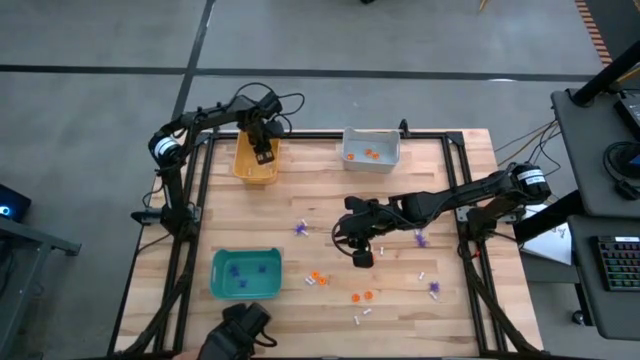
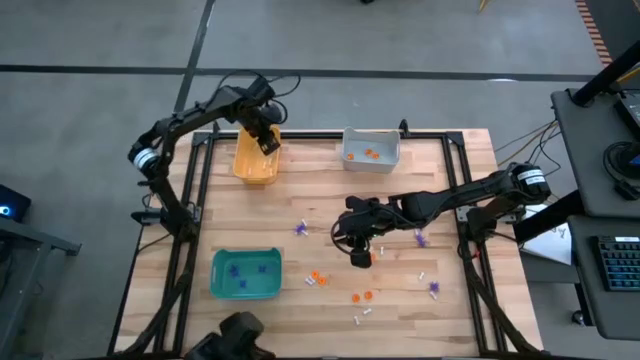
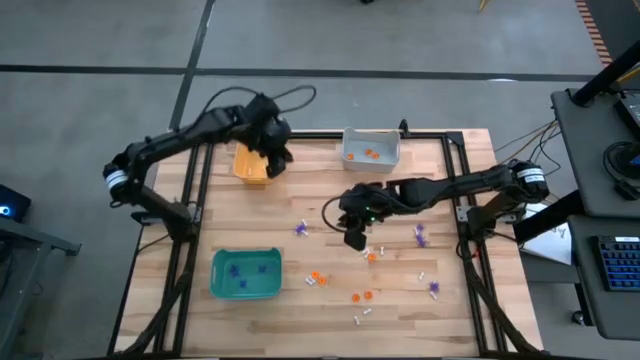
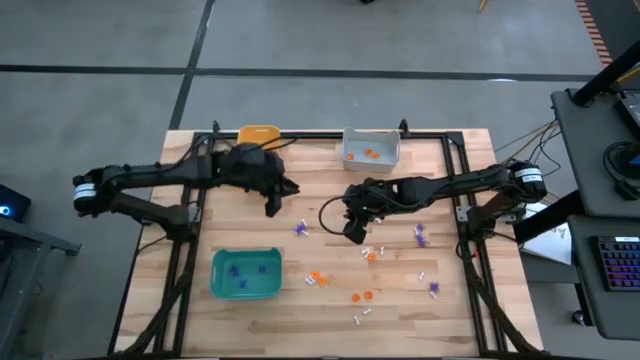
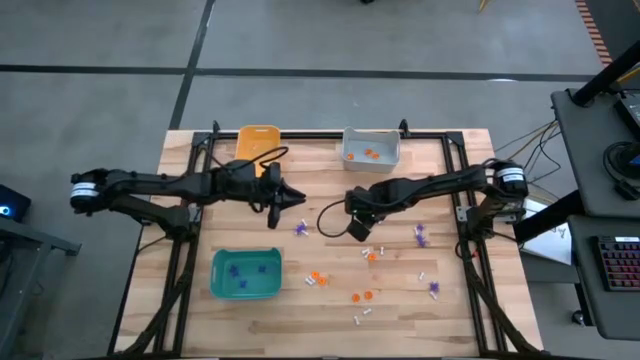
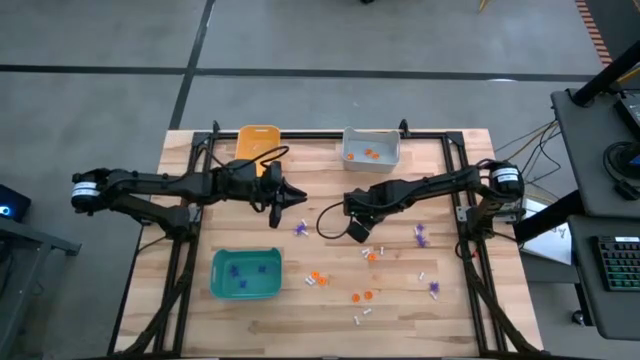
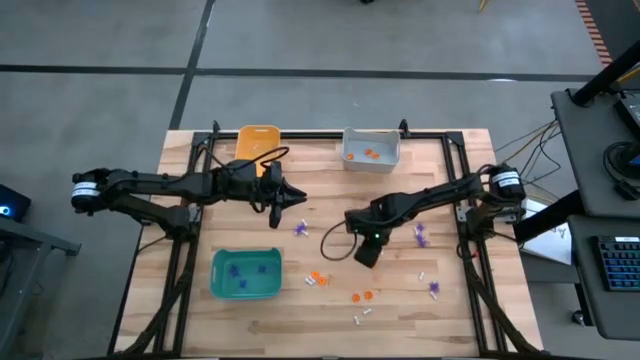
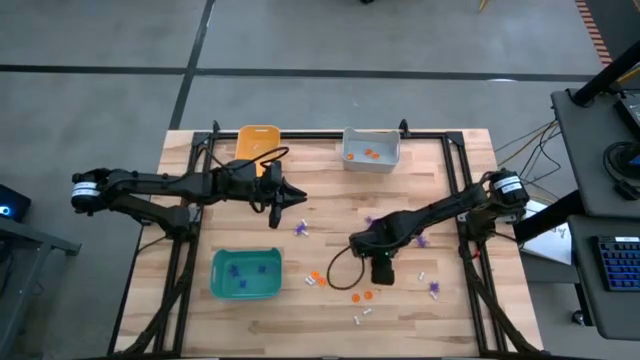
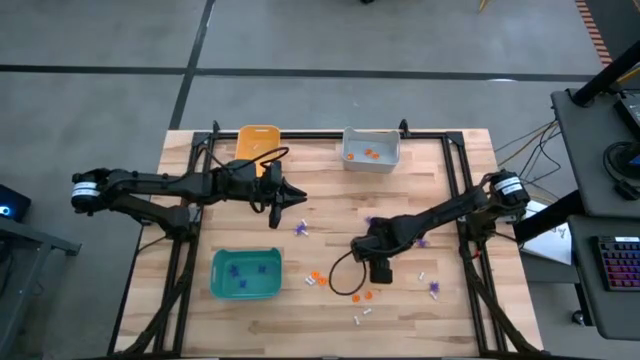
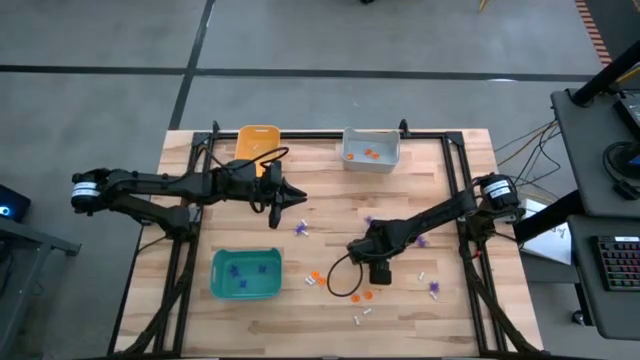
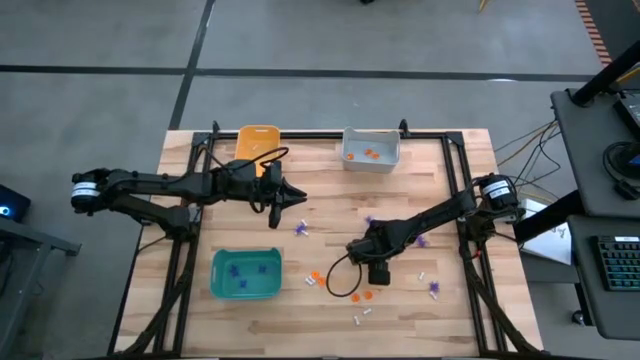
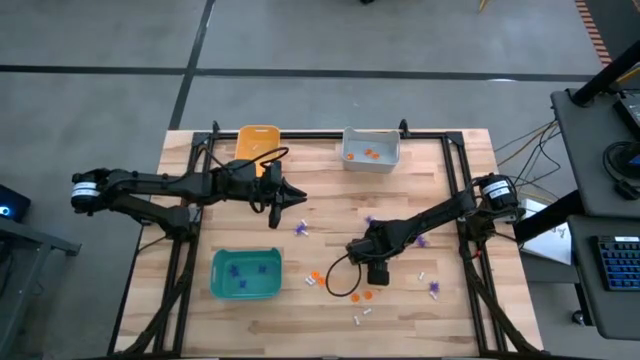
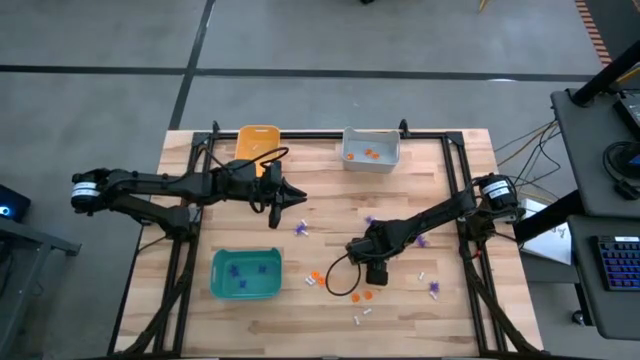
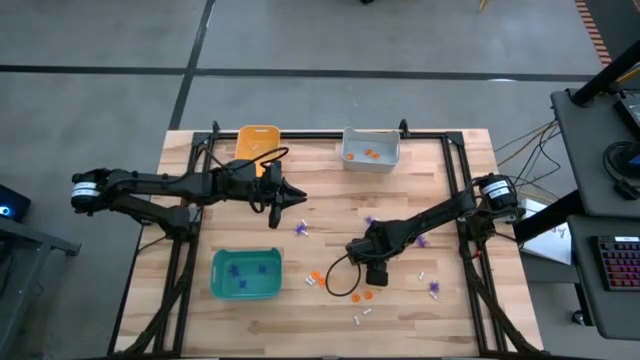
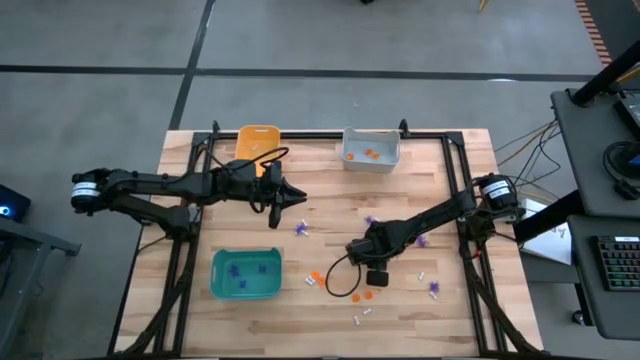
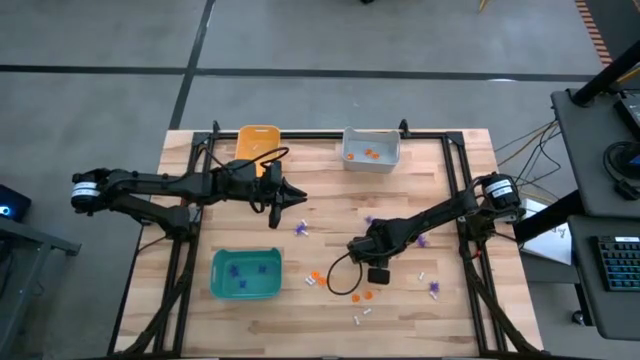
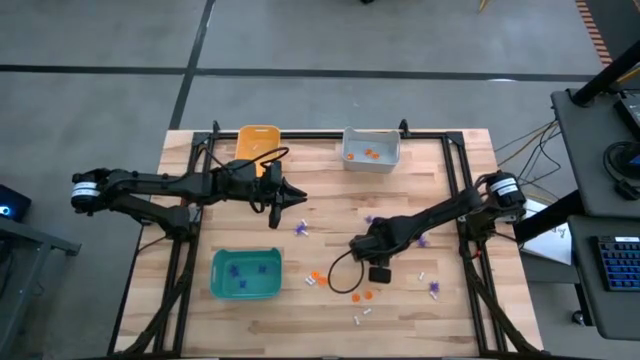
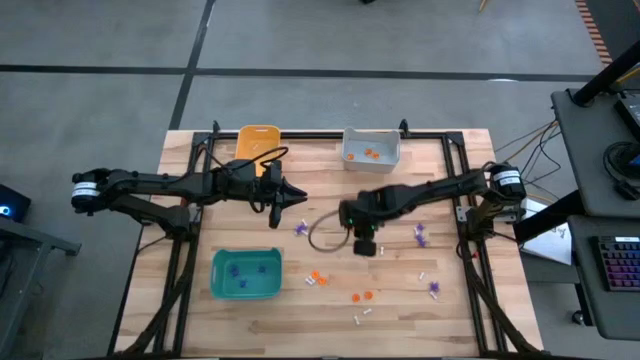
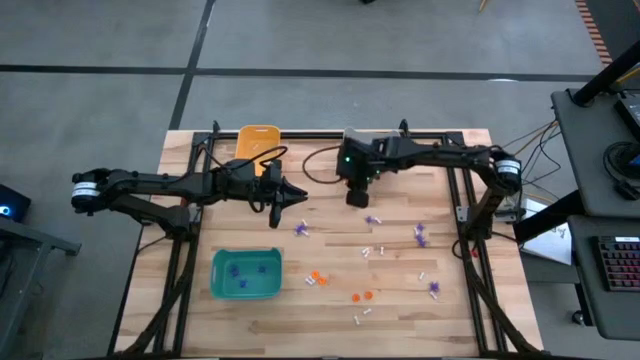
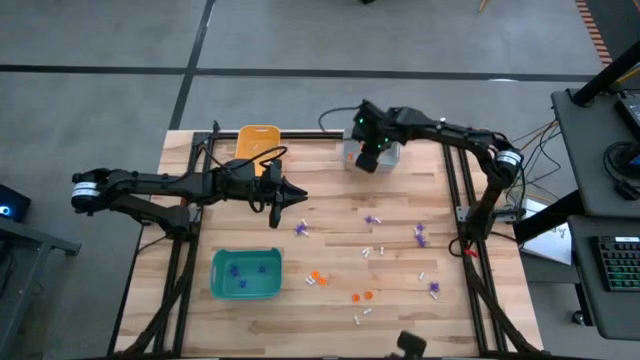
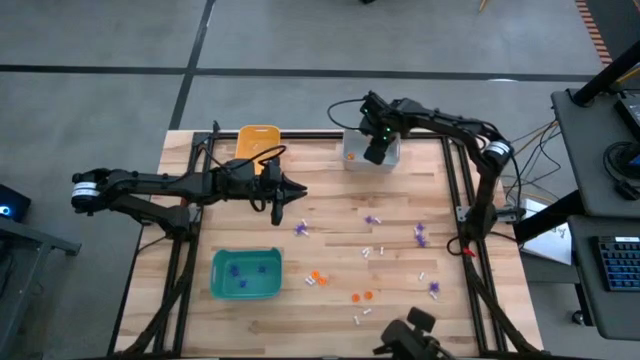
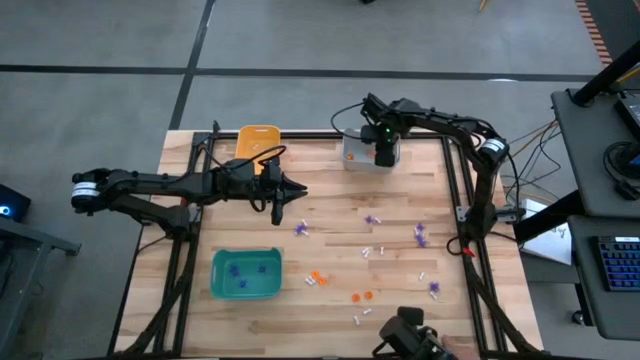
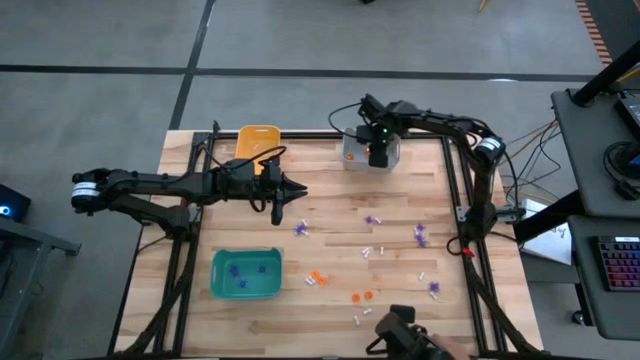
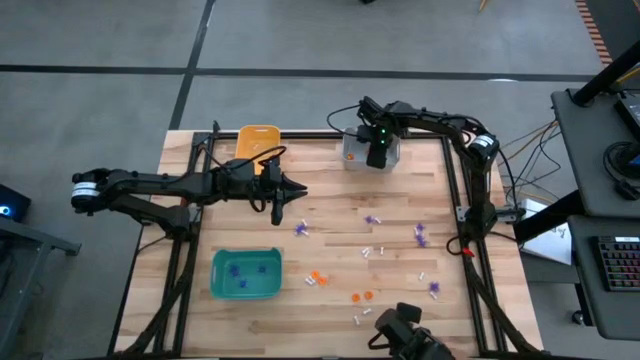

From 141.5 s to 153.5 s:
Task: Sort Halloween decoration
Put the orange pumpkin toy into the gray bin

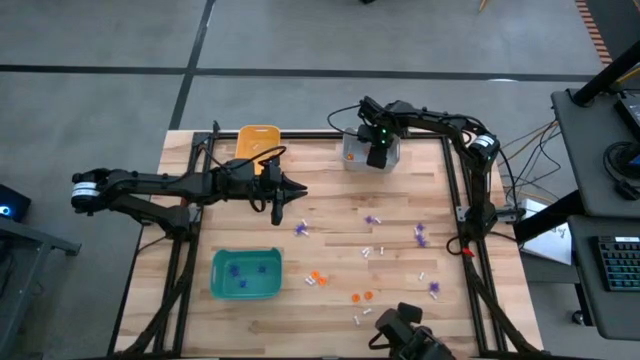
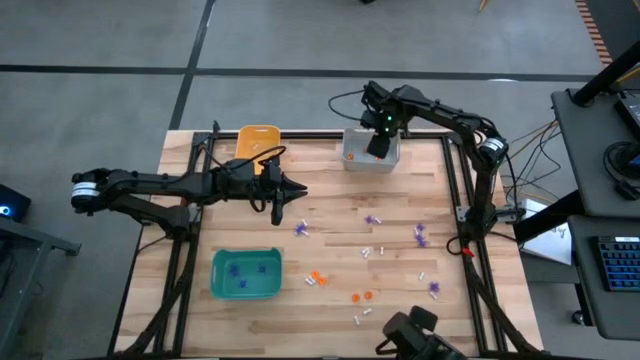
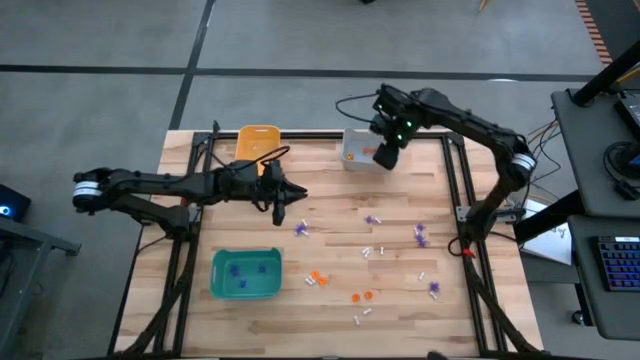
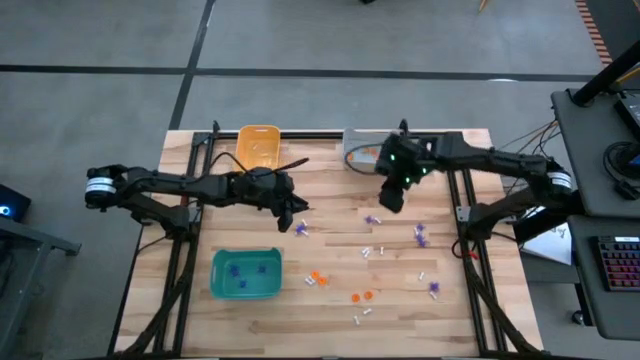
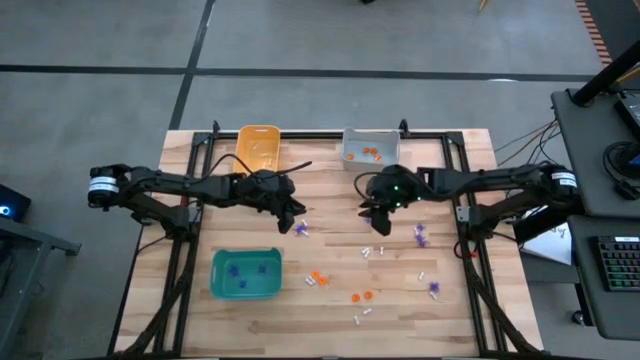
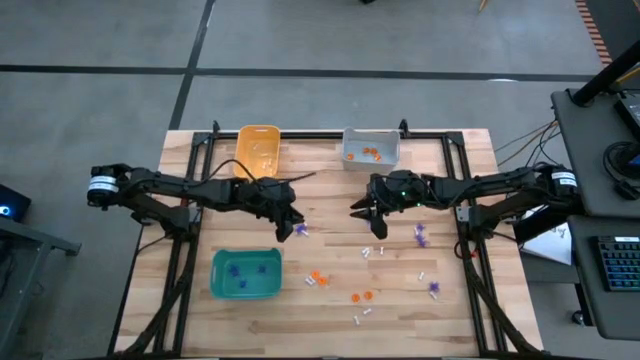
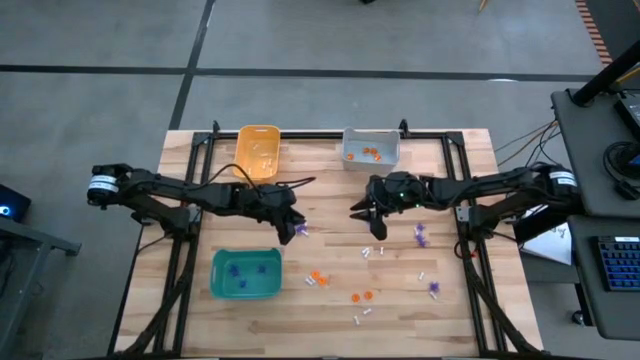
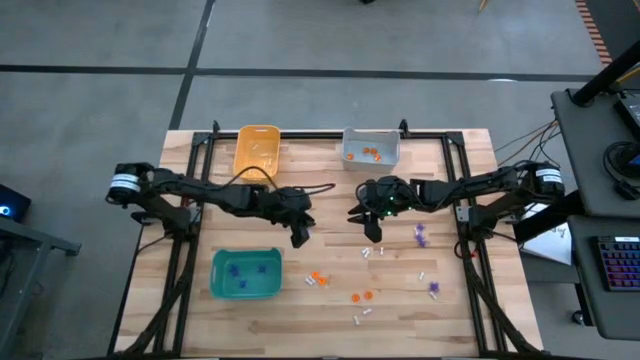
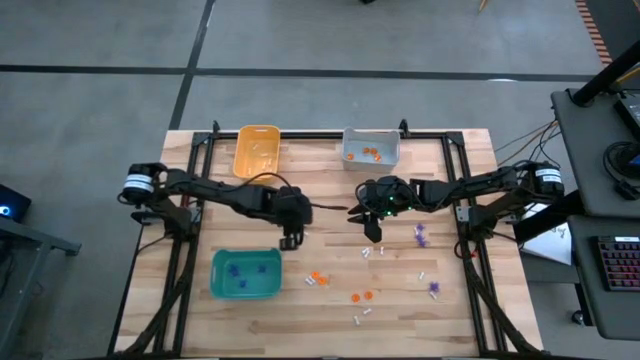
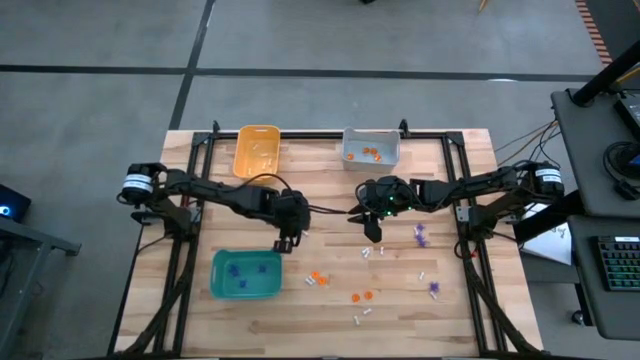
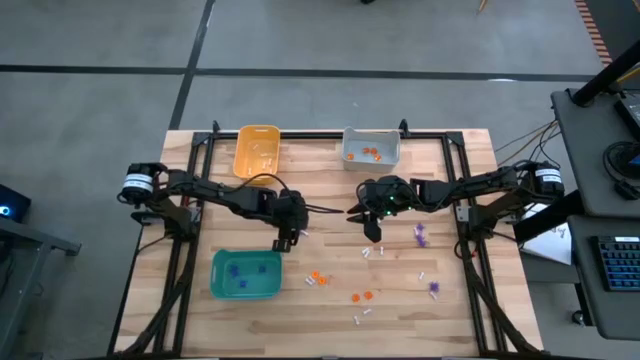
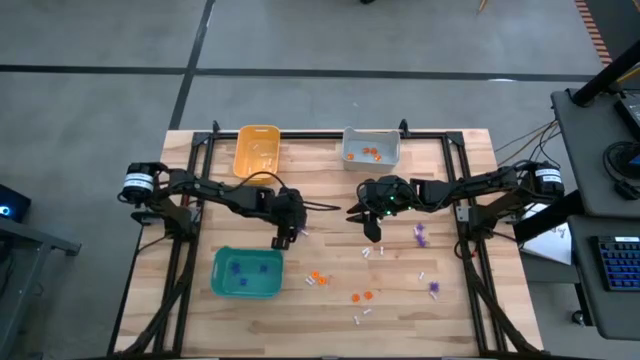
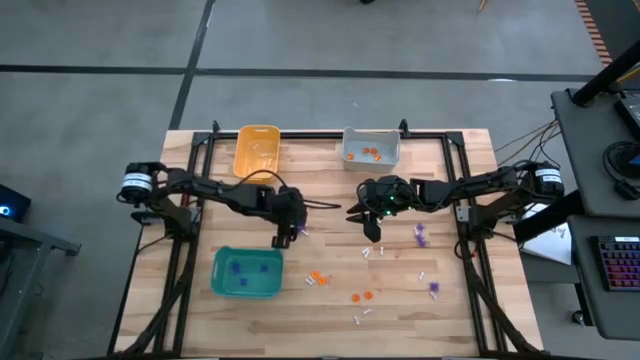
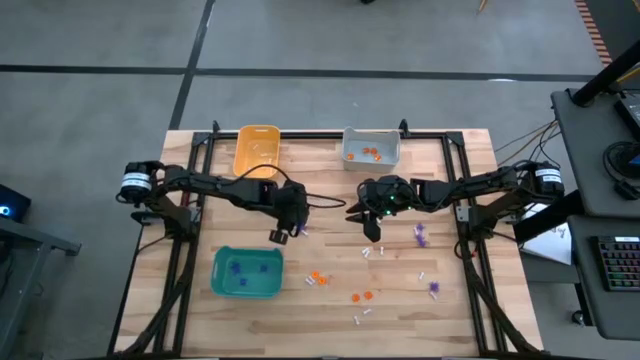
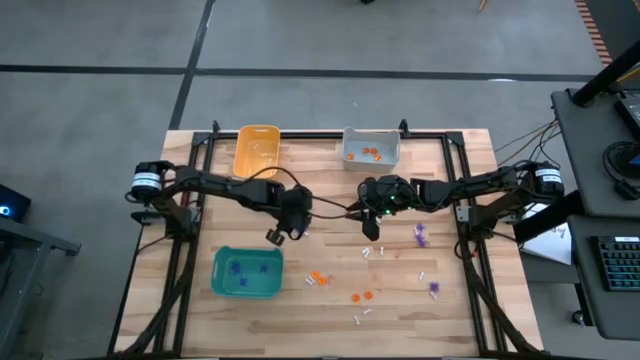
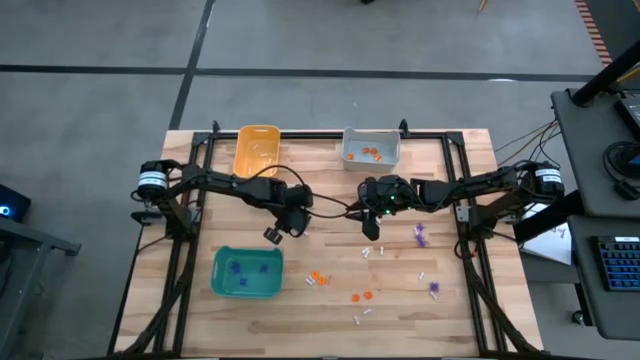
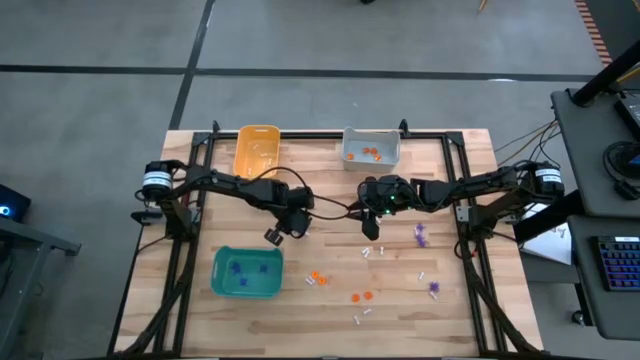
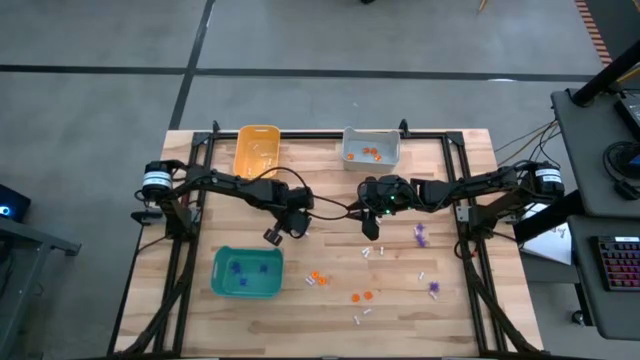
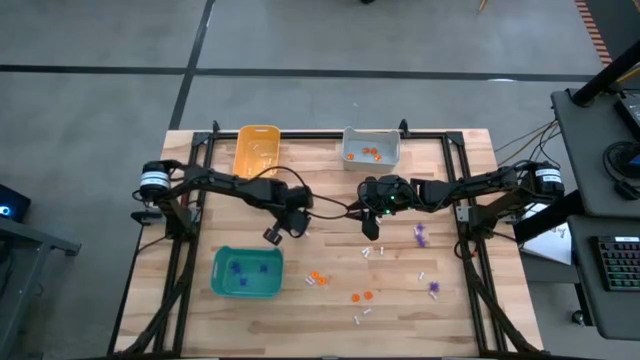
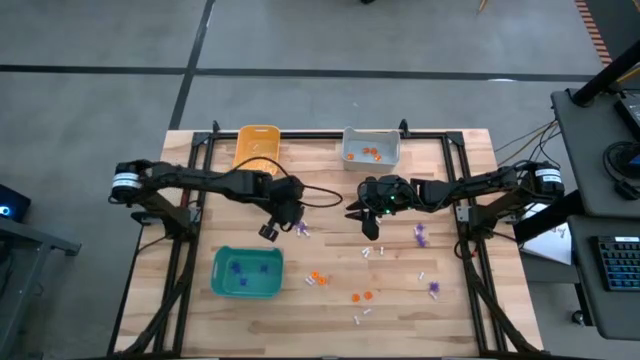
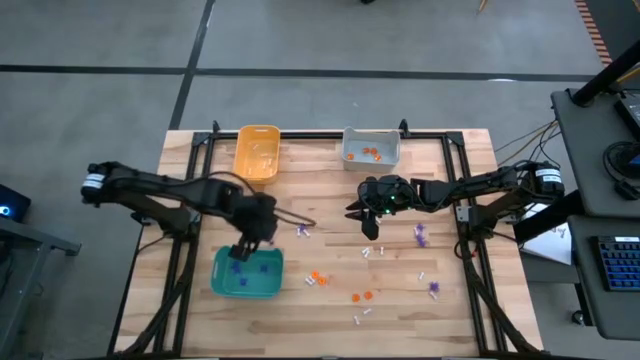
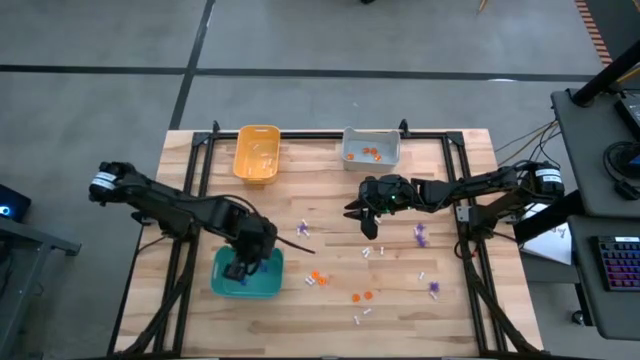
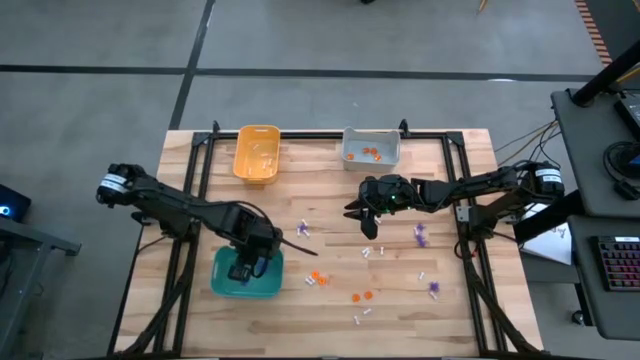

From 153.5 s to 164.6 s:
Put the blue spider toy into the green bin
